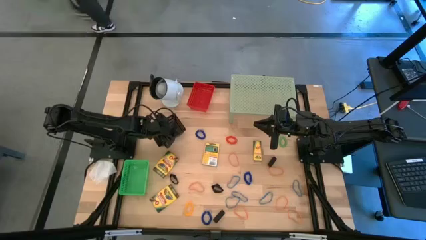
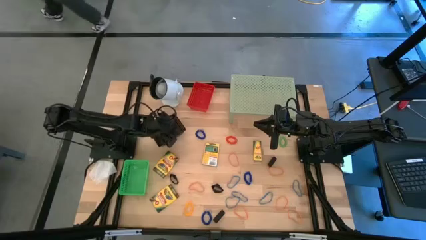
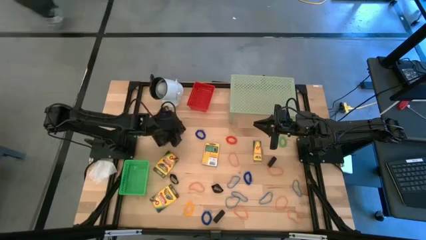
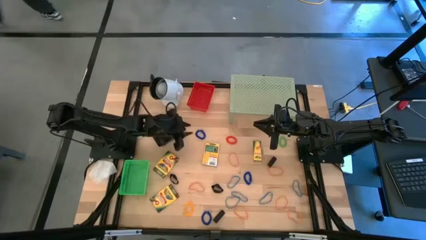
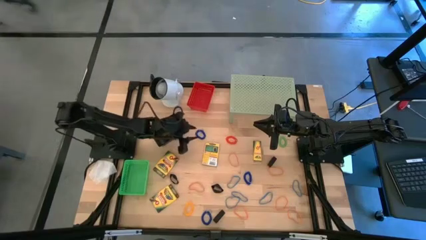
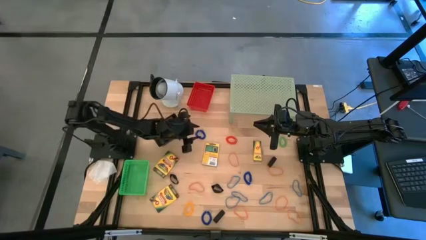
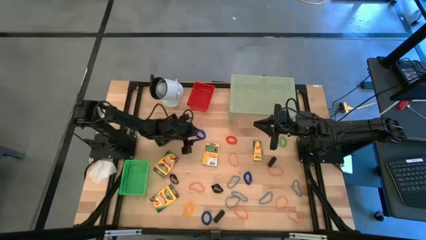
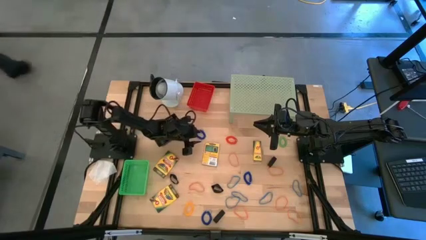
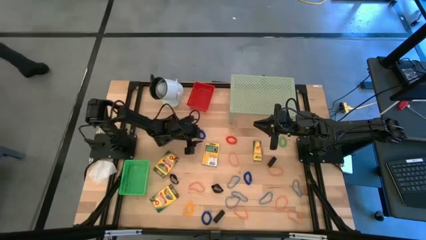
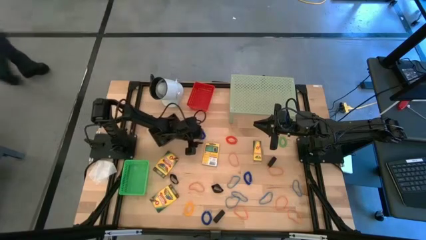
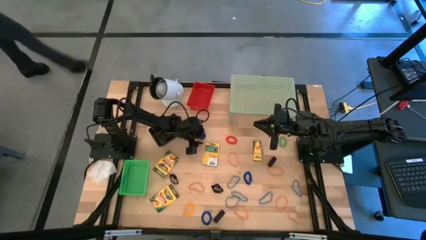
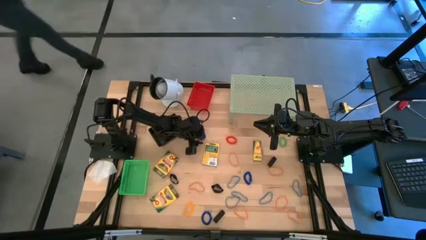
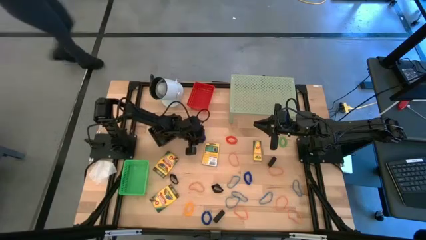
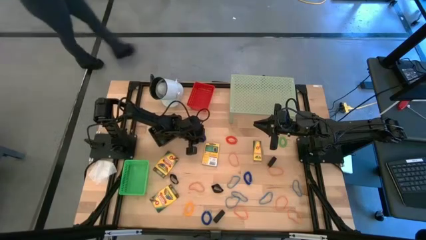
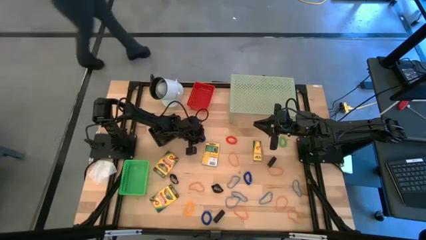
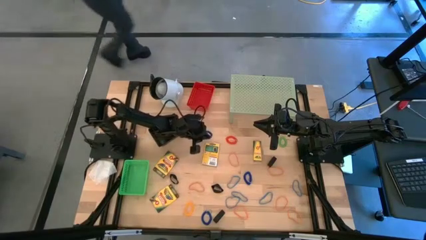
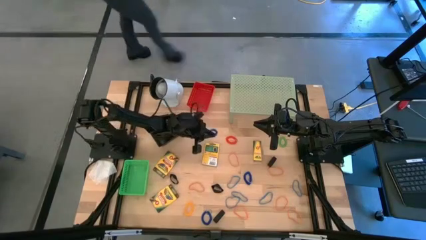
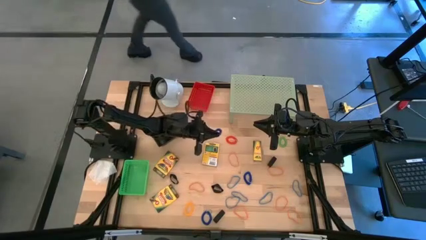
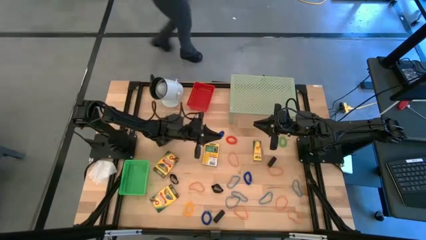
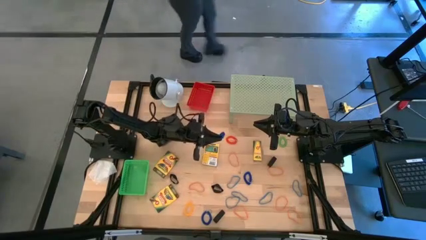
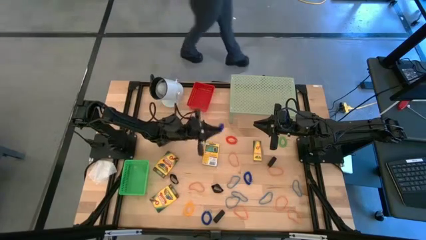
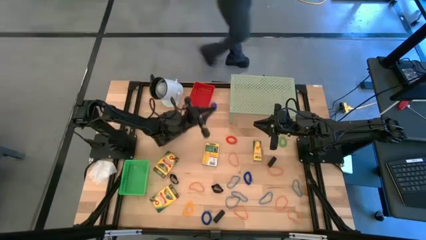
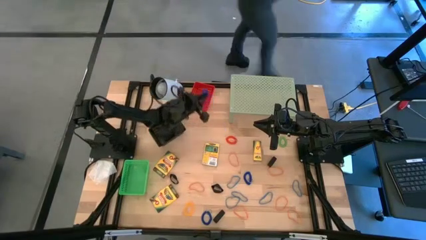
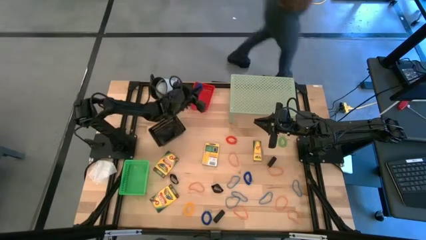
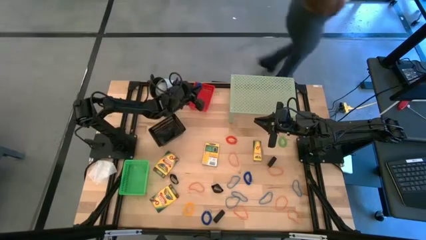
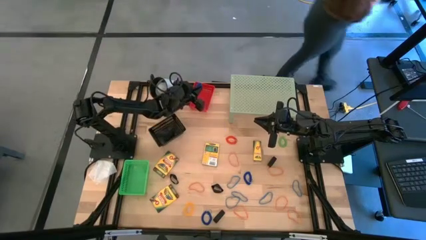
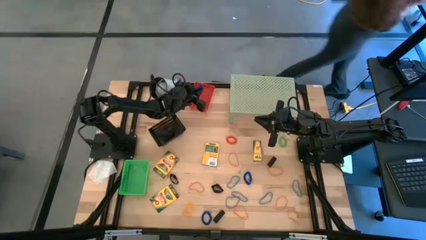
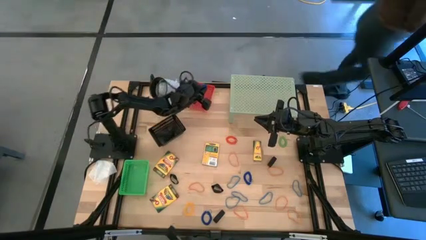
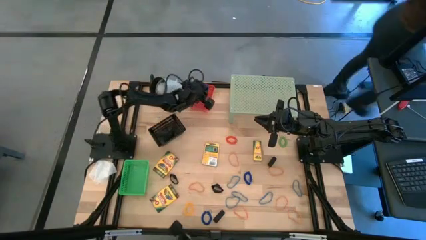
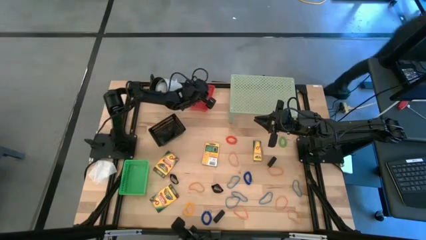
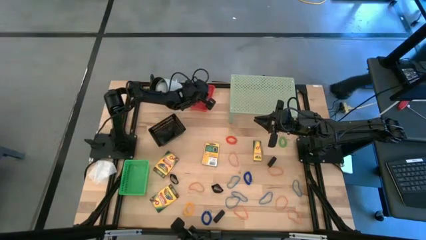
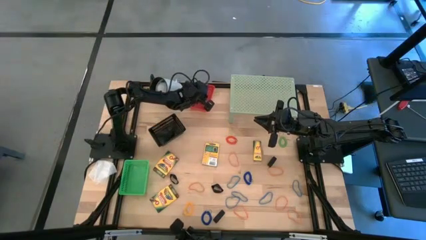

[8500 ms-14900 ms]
Task: Pick & Place Office Desk Supplies
Put the blue spring keychain into the red bin

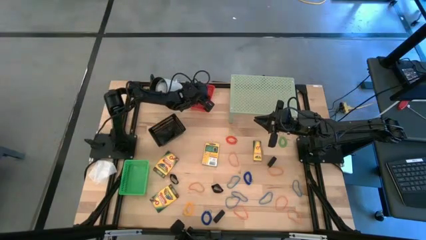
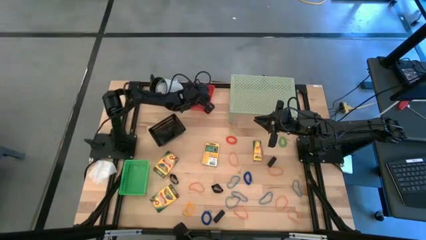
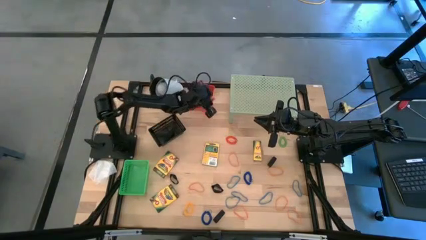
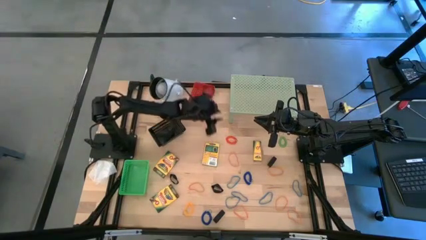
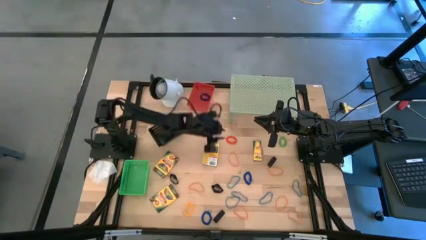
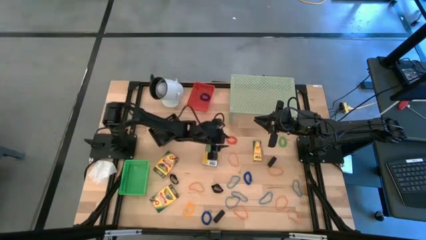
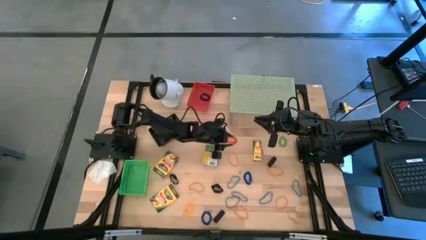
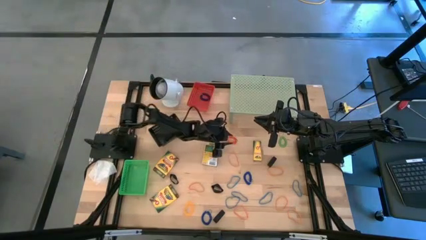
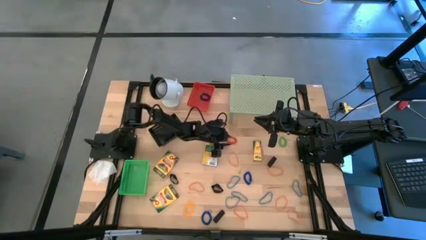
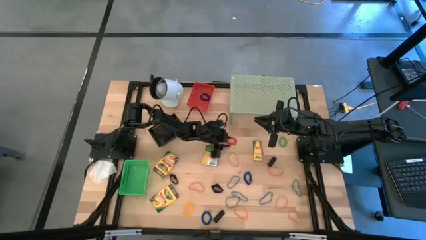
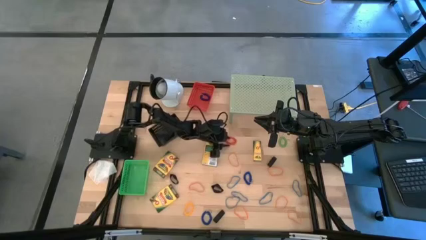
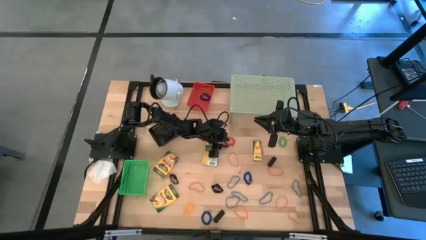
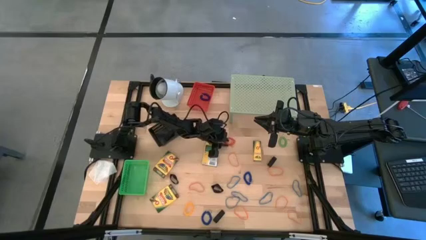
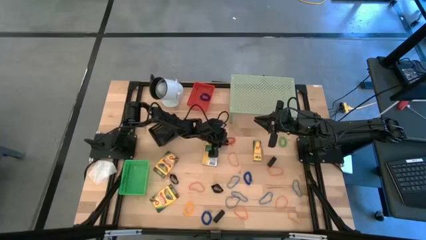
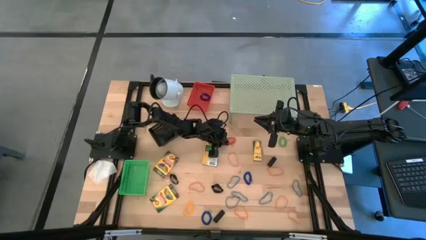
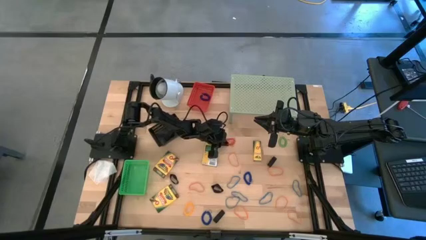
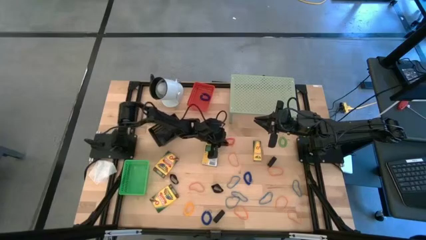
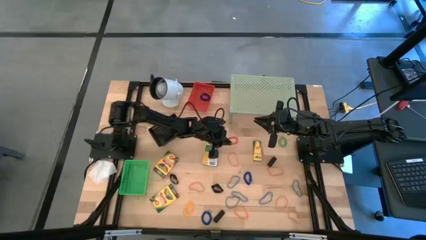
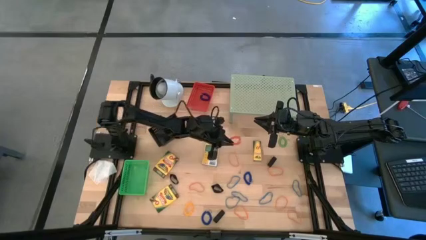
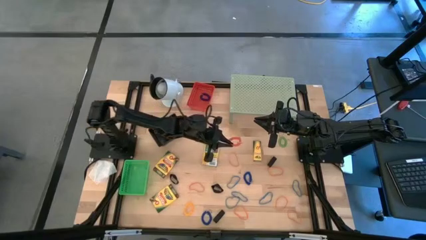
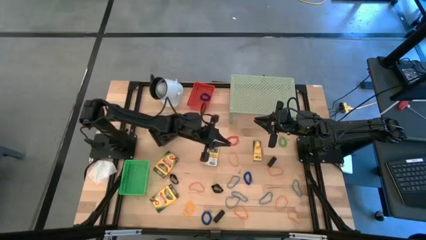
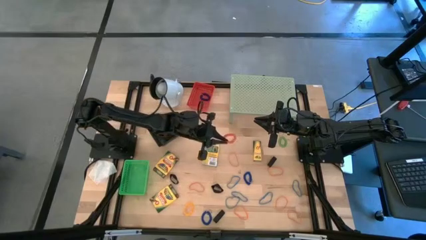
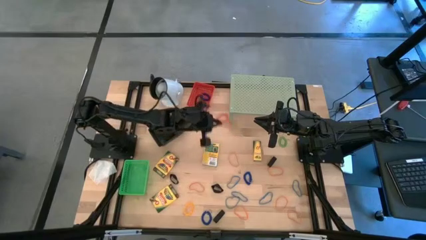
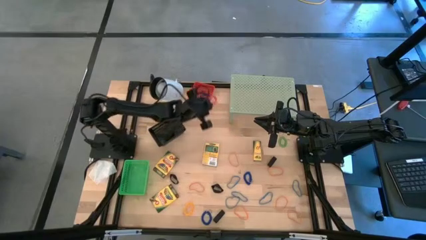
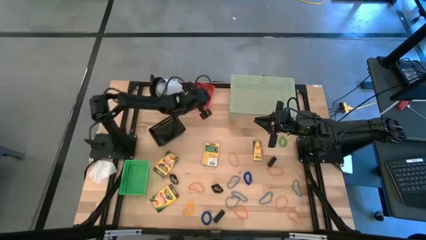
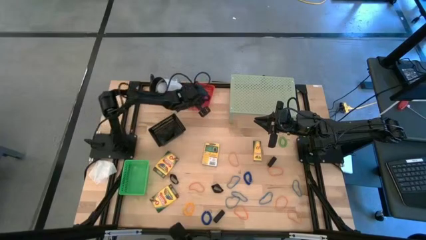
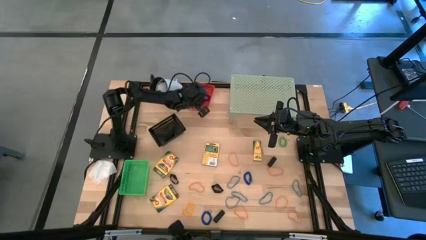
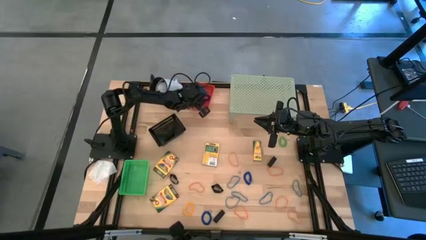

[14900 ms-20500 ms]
Put the orange spring keychain into the red bin

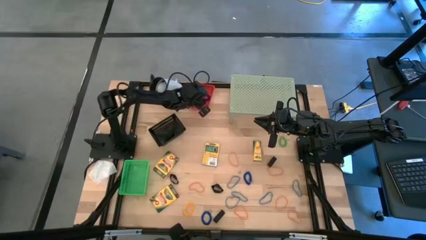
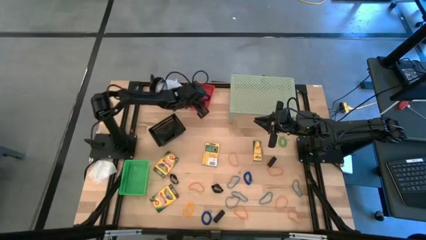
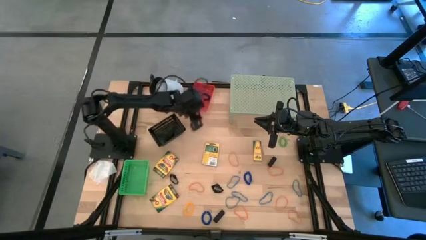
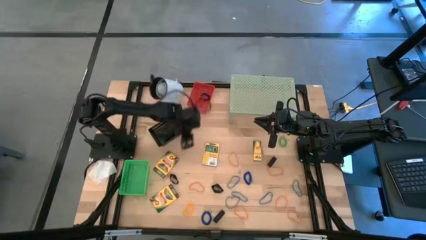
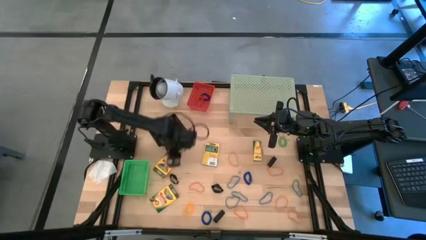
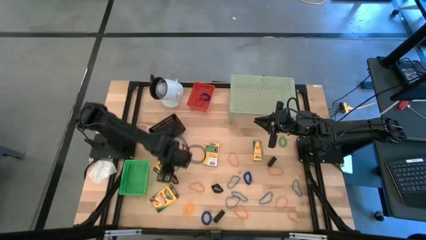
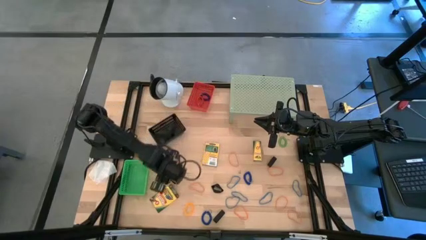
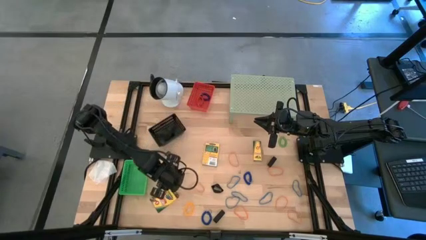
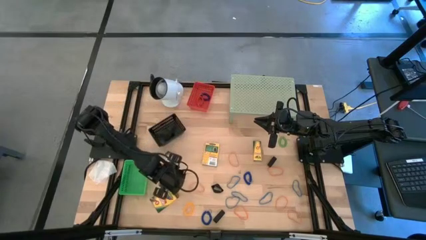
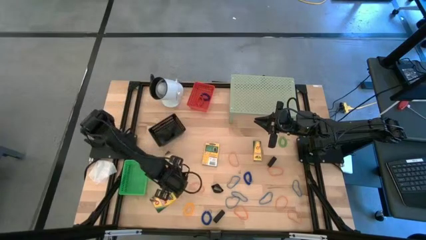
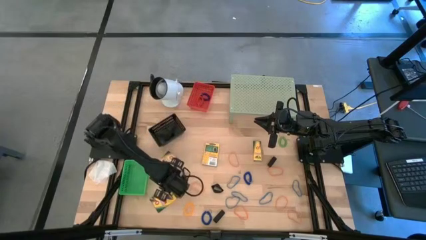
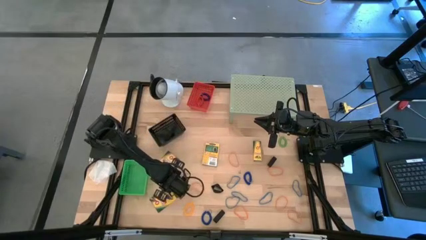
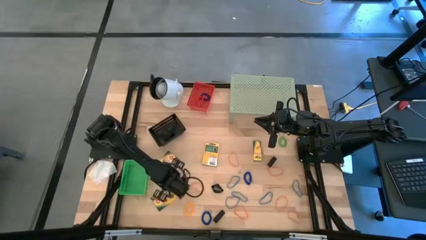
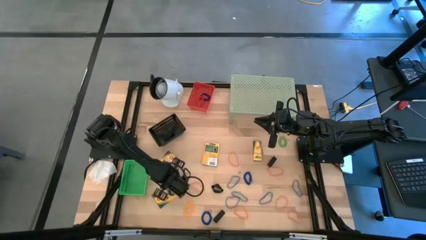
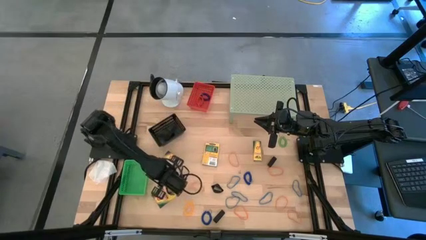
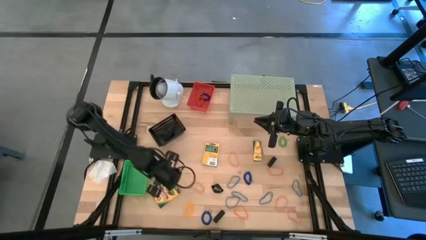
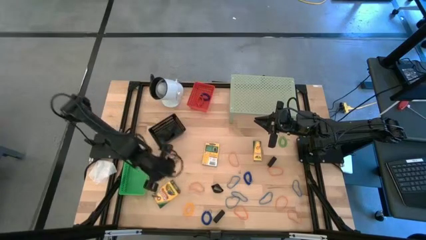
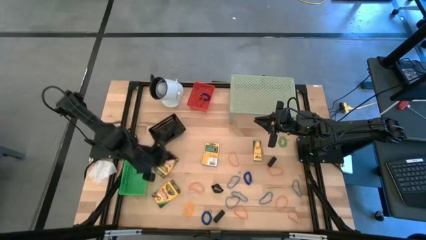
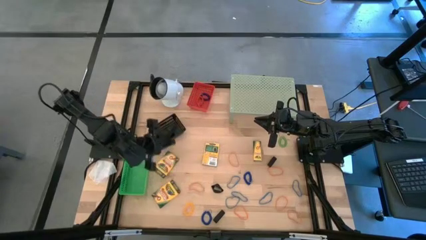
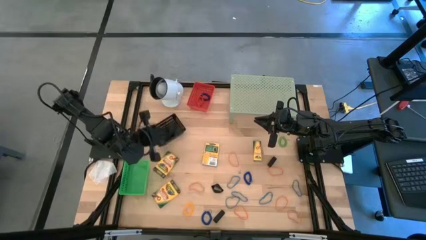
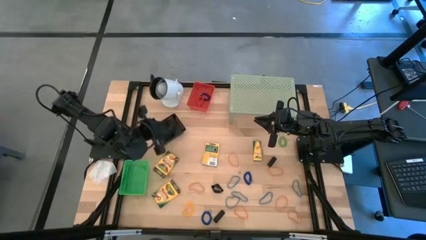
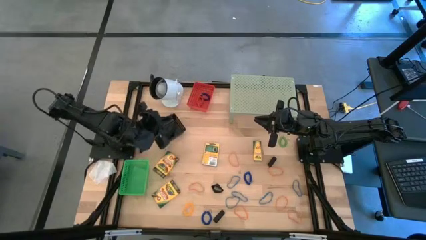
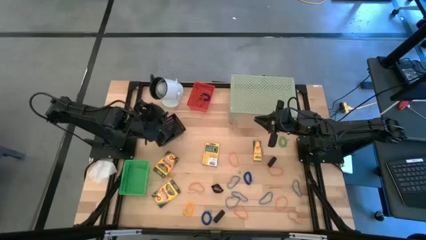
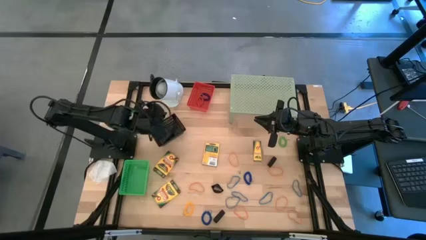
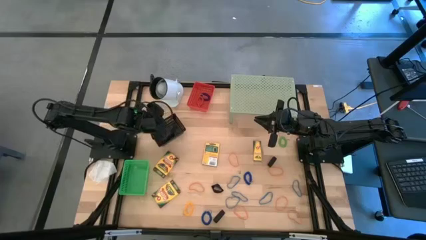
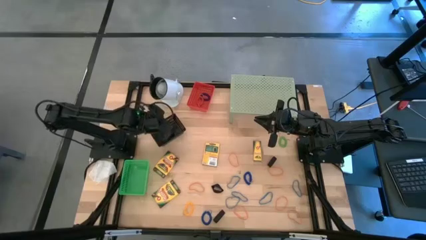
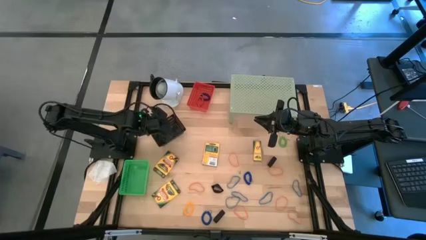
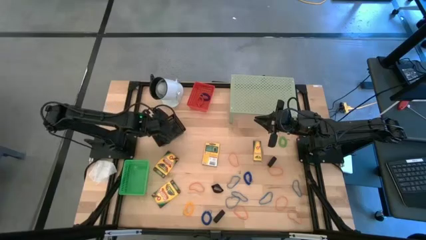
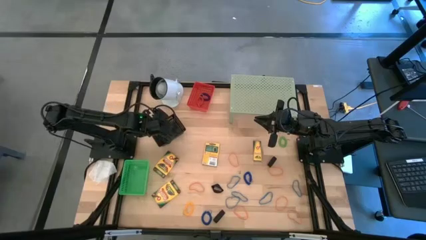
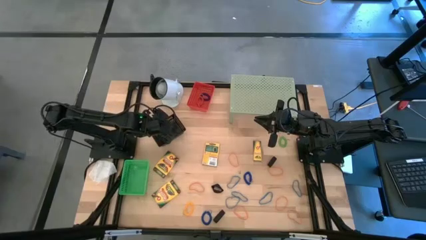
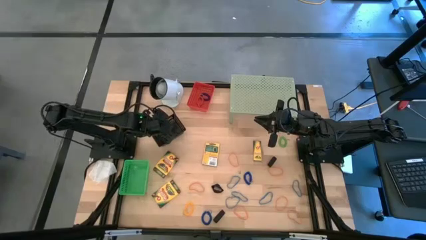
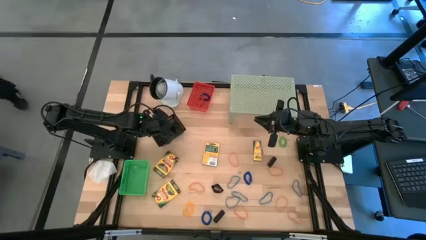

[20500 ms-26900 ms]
Put the black rubber band into the black bin
